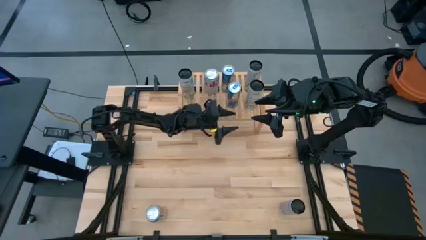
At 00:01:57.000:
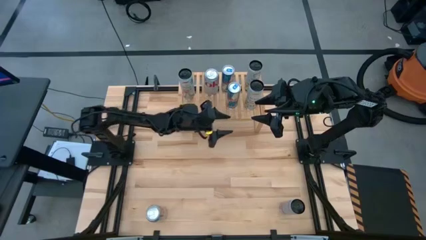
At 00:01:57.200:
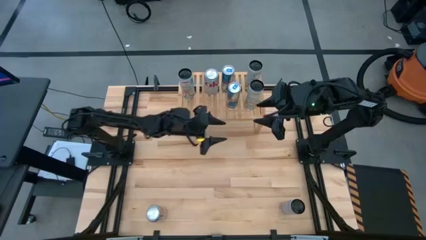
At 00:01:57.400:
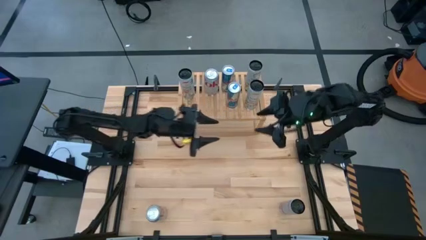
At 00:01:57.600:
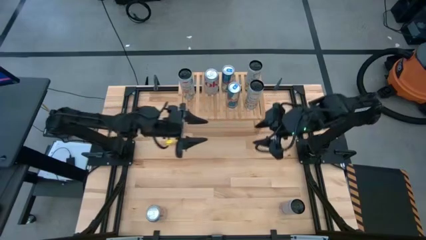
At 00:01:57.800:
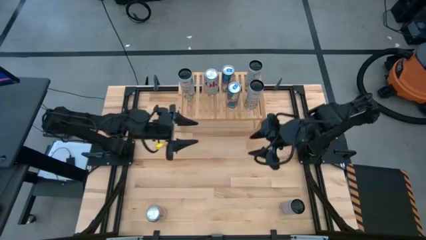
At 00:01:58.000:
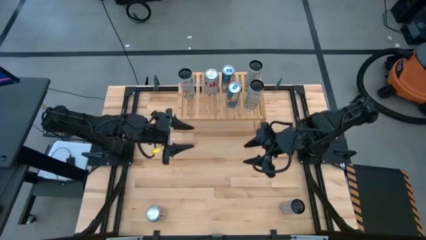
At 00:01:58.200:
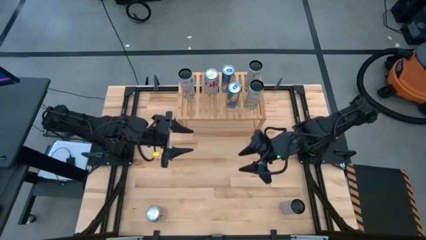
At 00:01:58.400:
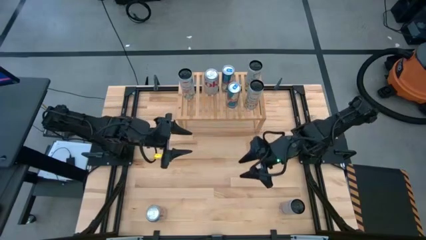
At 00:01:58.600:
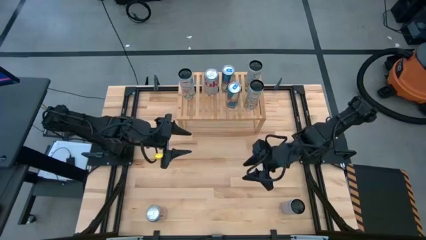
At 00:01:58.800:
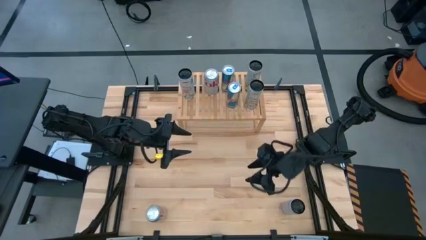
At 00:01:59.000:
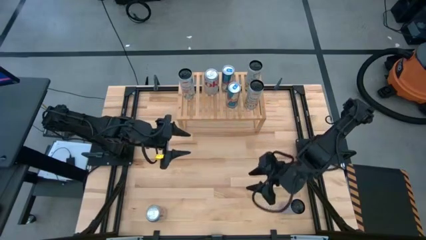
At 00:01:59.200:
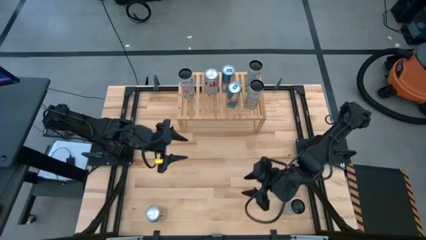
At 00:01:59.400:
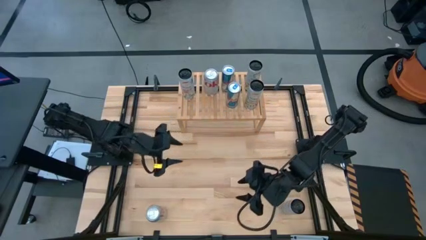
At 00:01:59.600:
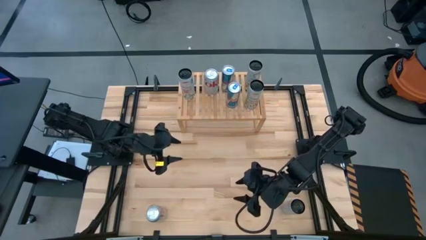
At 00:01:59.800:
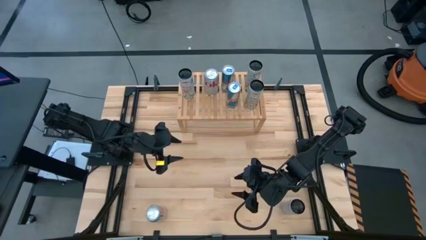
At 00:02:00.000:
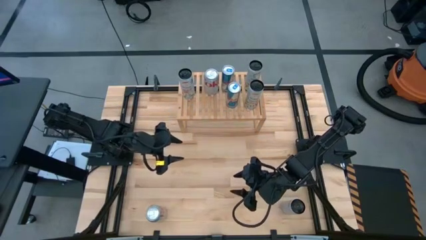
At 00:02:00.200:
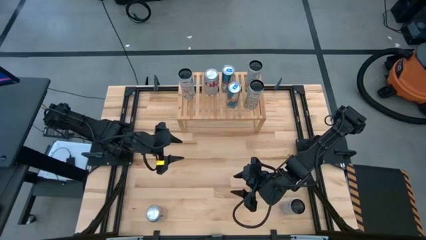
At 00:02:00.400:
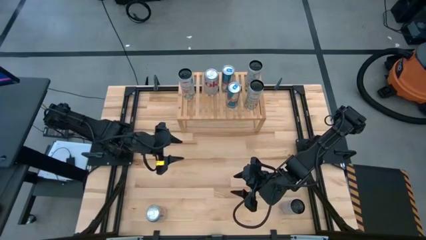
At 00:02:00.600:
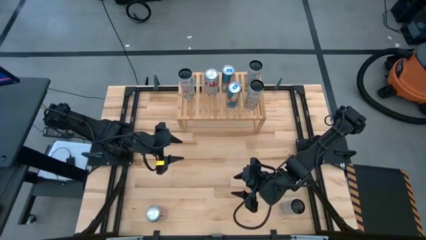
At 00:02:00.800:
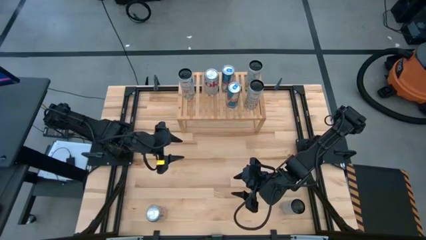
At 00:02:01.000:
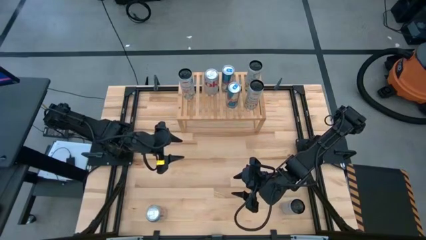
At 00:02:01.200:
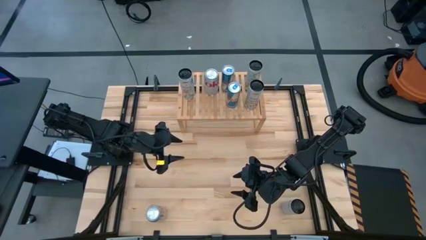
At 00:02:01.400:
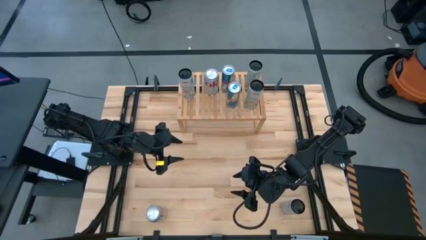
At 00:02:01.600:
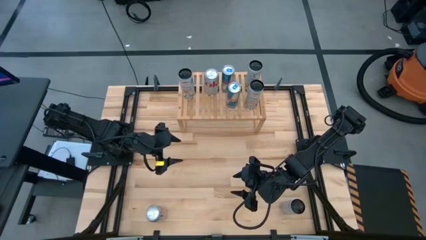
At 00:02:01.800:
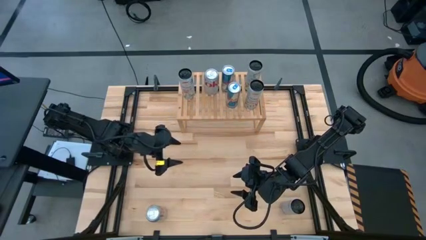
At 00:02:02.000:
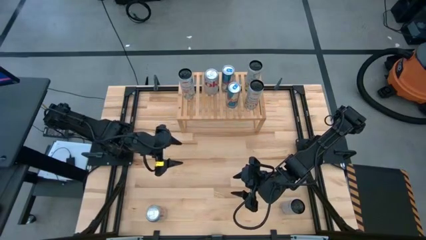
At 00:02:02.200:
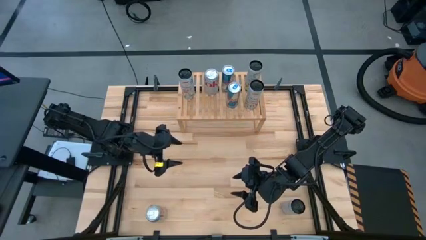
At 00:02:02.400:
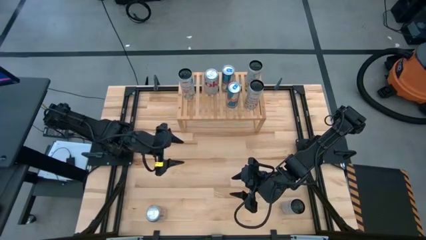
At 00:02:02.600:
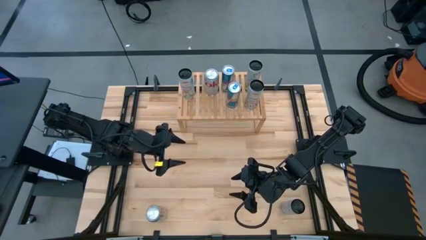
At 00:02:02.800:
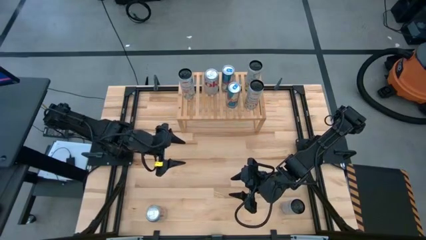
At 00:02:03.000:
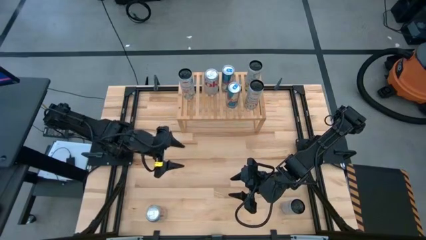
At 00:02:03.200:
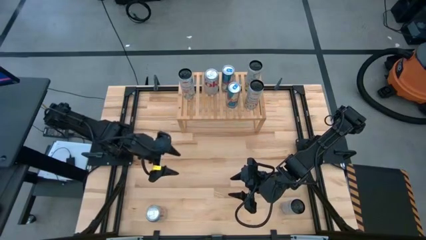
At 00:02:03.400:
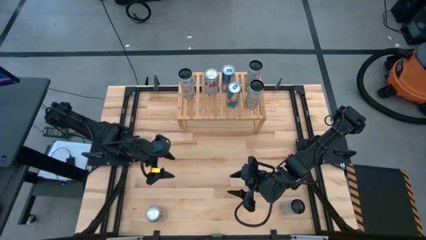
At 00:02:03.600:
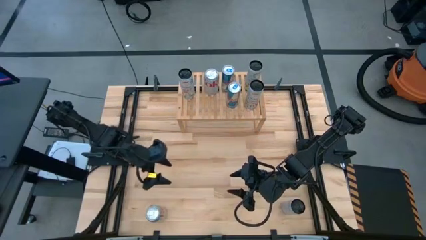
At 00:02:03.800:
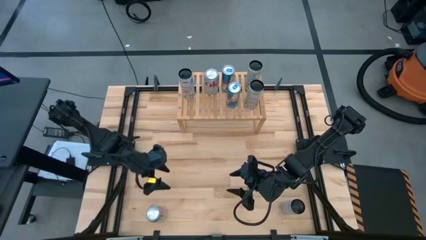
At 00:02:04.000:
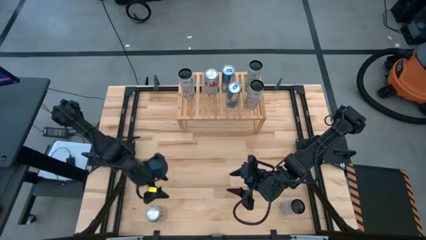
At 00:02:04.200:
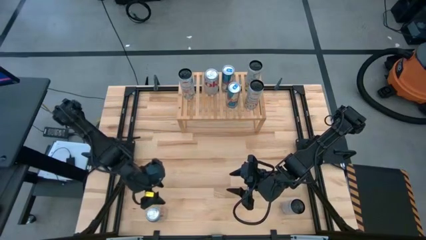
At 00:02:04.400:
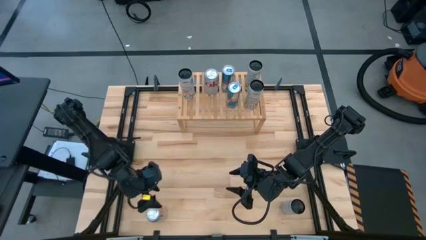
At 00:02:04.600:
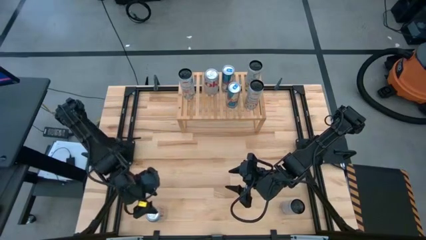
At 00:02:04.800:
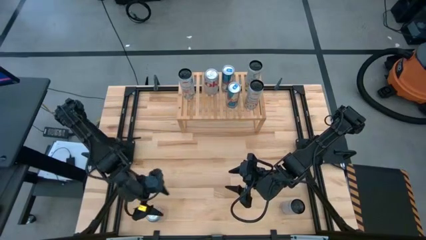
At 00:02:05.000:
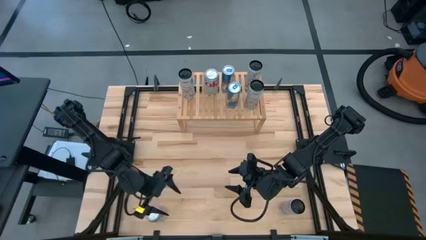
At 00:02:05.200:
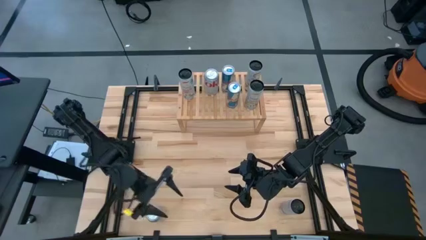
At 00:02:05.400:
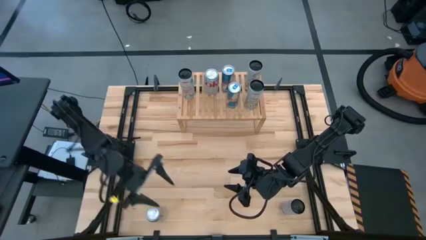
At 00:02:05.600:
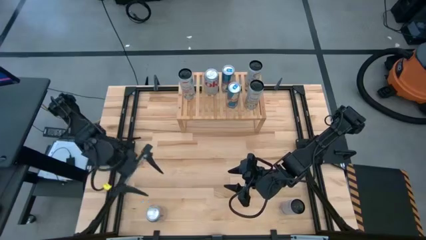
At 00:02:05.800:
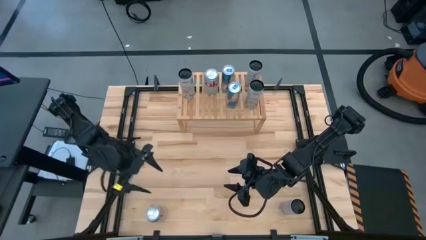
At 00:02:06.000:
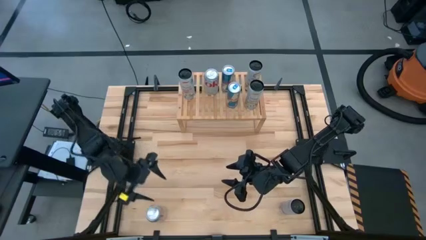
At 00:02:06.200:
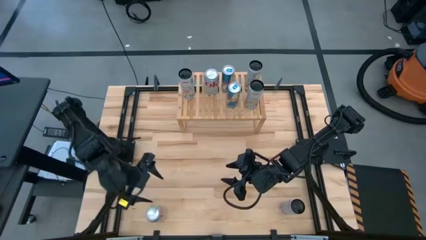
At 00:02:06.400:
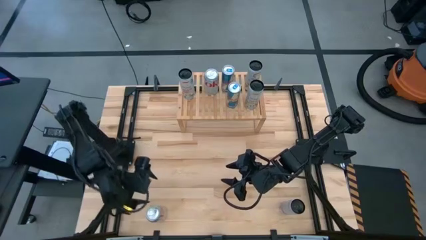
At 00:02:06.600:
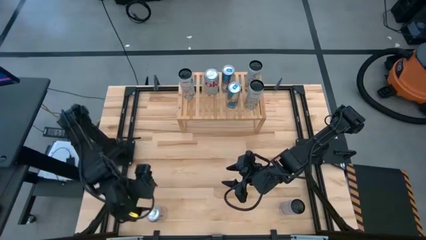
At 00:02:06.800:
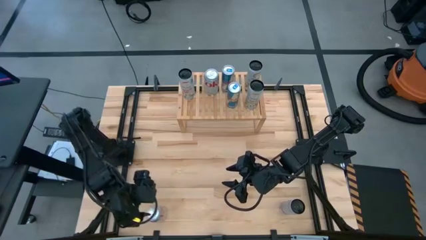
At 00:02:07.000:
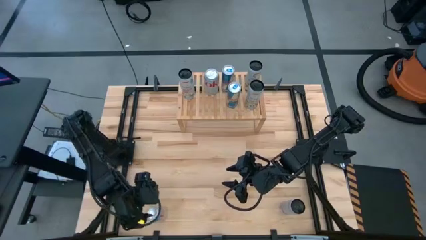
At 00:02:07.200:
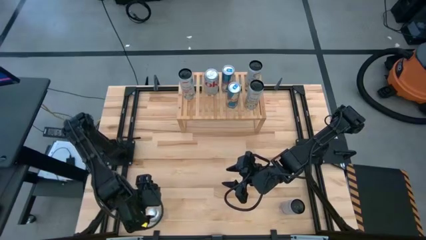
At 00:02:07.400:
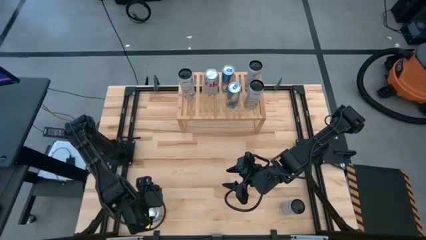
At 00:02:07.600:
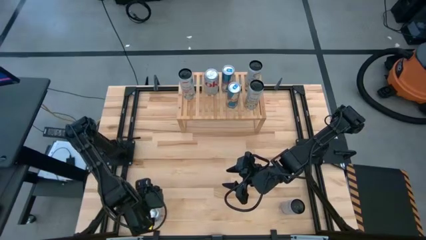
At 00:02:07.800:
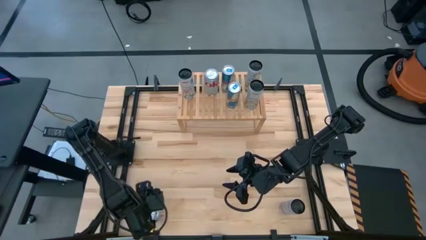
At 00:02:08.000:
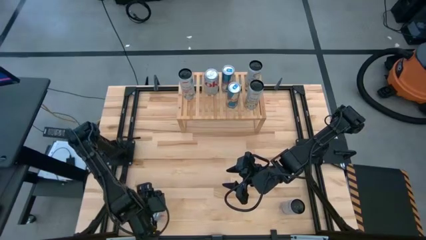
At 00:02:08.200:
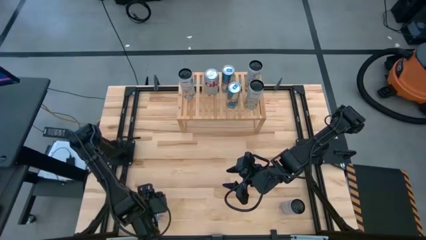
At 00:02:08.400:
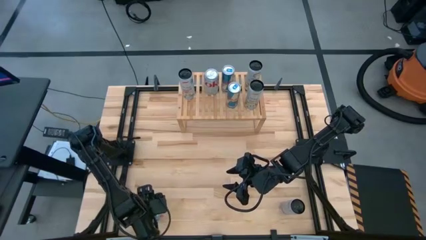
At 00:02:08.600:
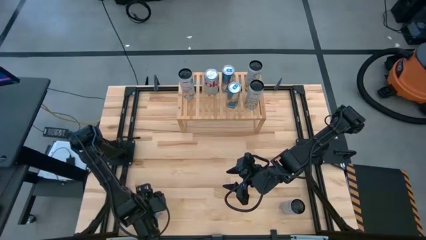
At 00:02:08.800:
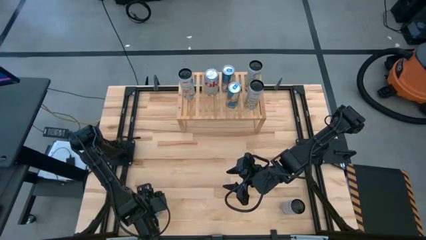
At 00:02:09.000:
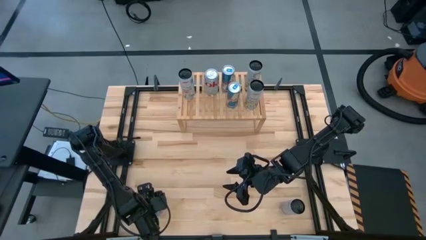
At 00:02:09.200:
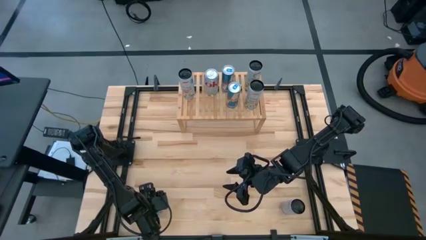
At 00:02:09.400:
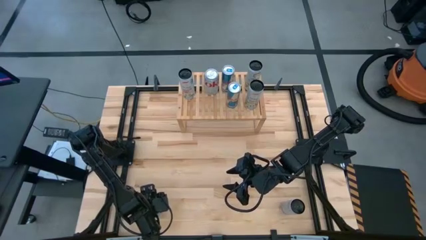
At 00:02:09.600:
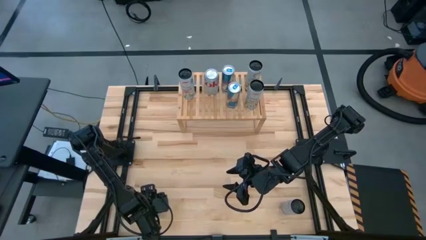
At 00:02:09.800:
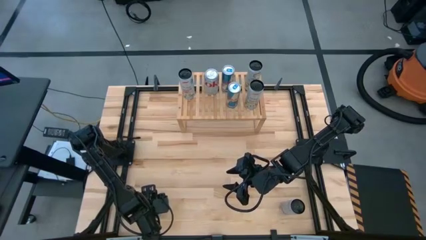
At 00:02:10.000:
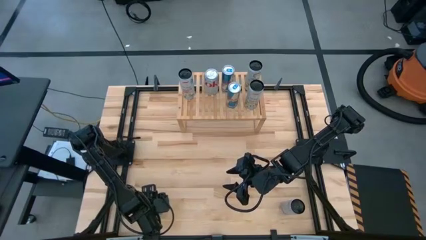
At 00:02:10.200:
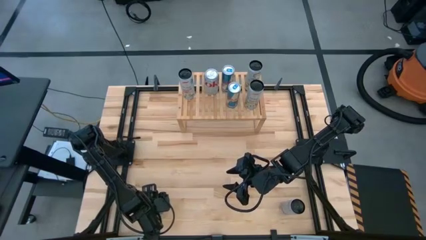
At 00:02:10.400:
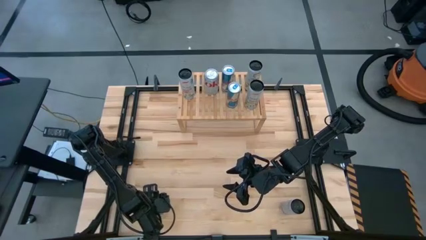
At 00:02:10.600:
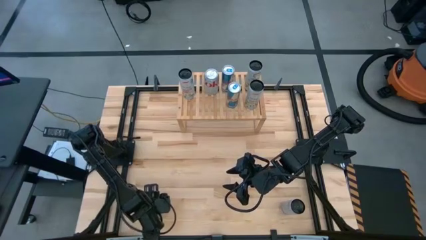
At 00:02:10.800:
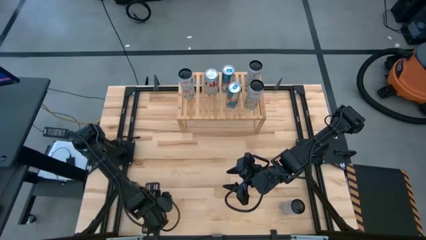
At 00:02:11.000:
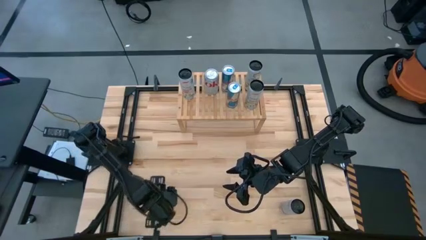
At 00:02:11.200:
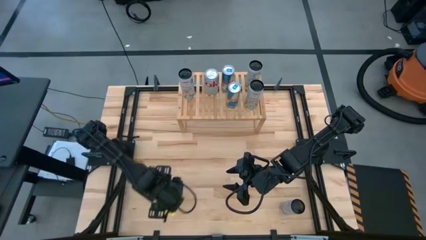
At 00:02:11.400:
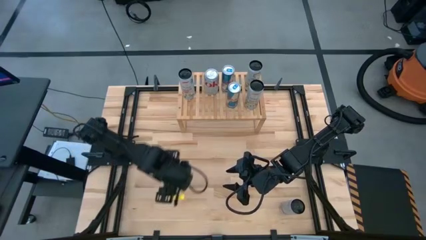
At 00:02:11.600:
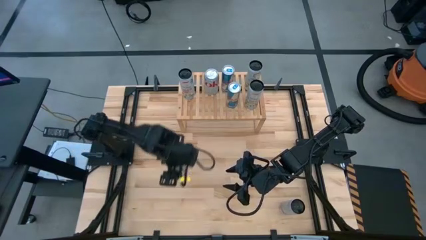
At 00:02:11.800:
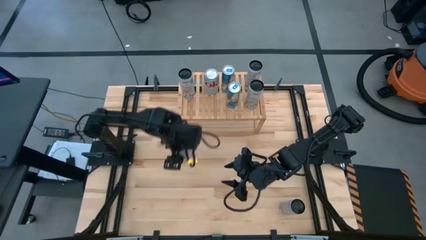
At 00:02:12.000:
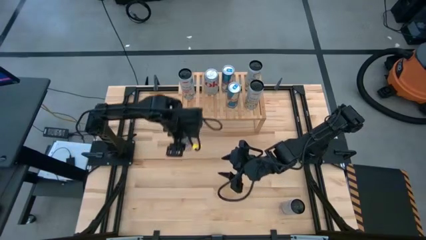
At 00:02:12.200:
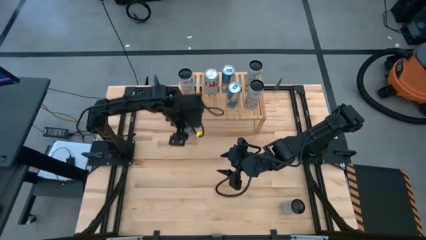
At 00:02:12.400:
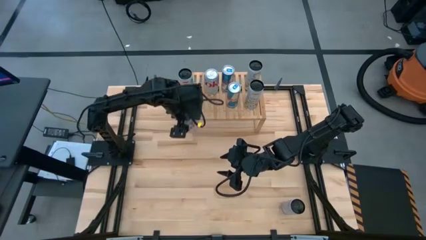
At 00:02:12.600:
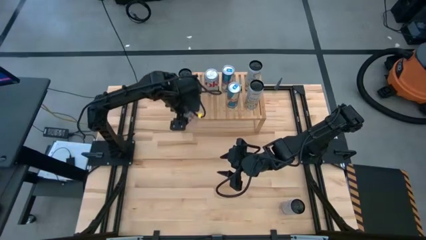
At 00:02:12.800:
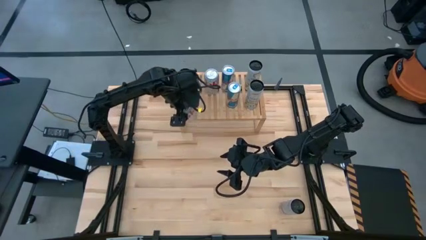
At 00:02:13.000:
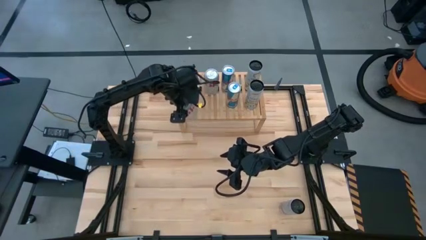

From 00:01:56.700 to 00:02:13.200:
Task: Place canned beverage on shelf
Put the silver soda can on the shelf aligned with the other silver soda can
